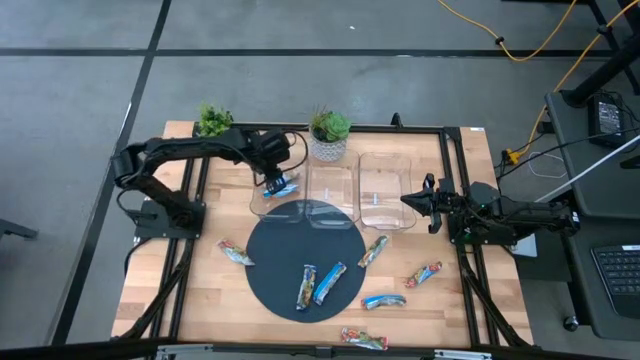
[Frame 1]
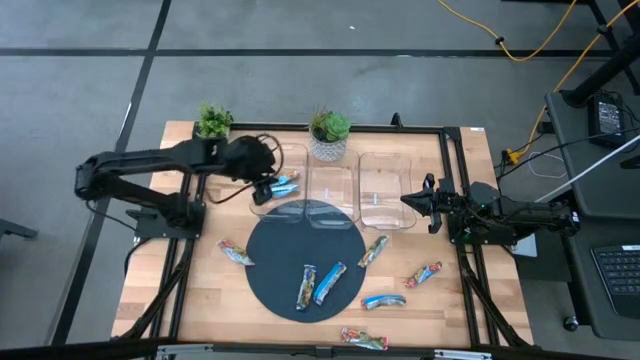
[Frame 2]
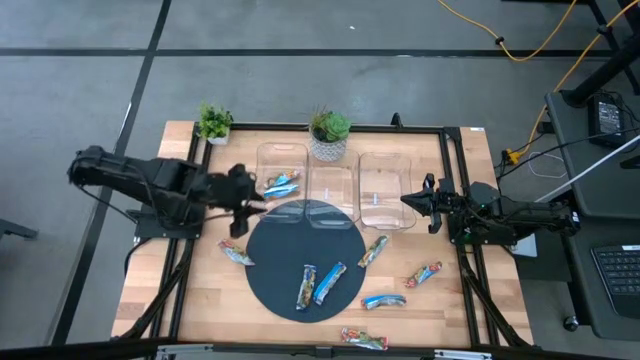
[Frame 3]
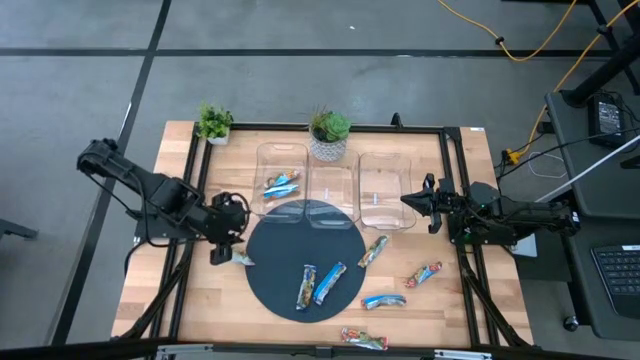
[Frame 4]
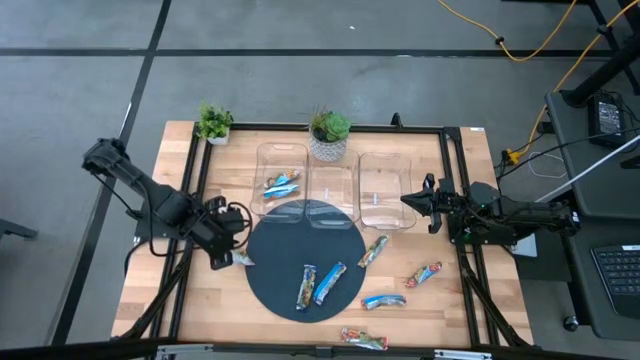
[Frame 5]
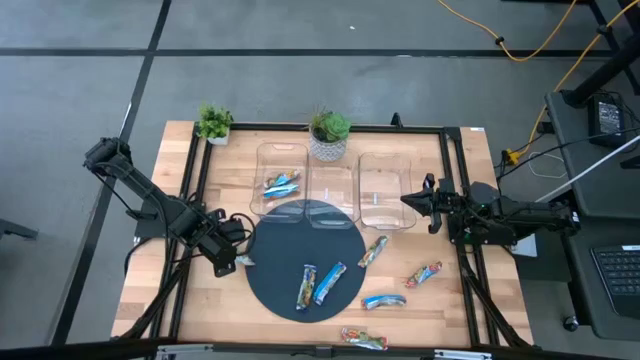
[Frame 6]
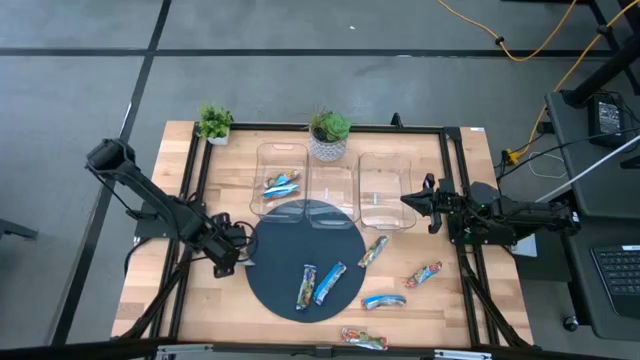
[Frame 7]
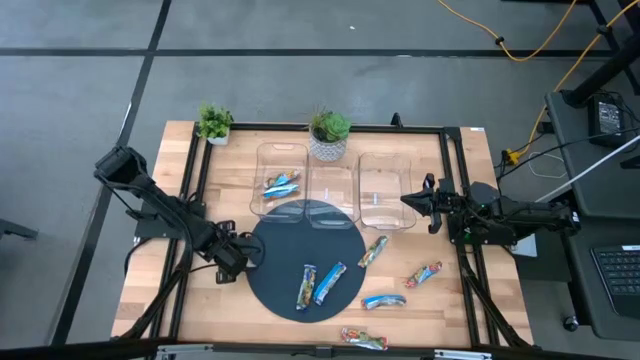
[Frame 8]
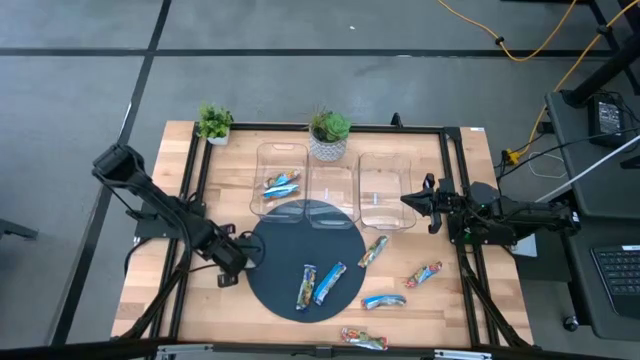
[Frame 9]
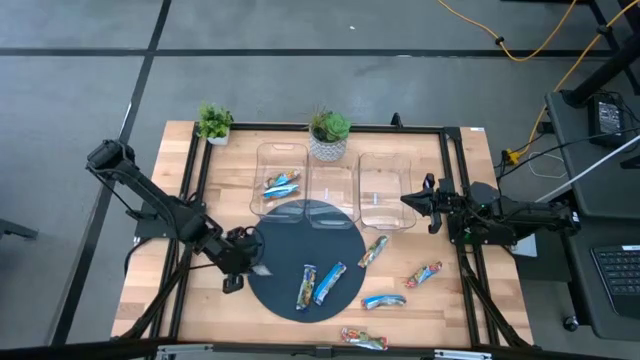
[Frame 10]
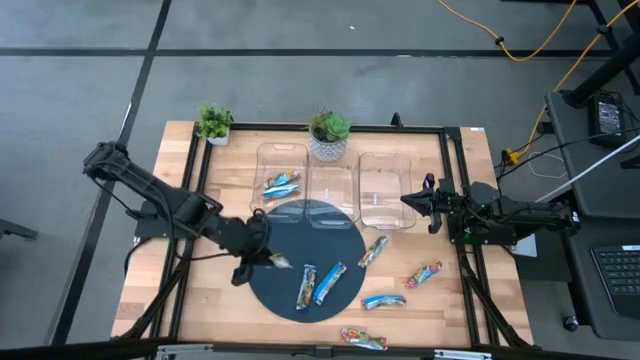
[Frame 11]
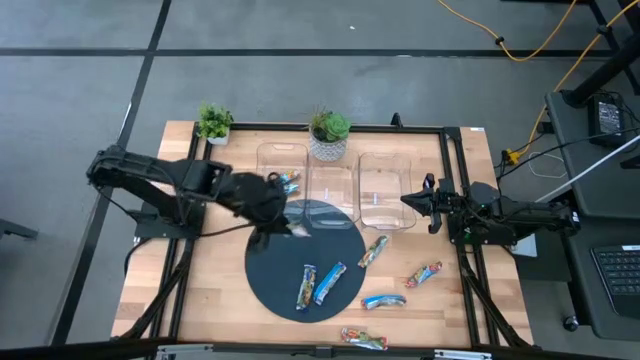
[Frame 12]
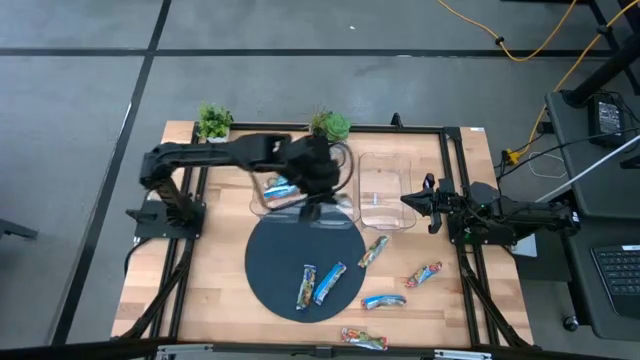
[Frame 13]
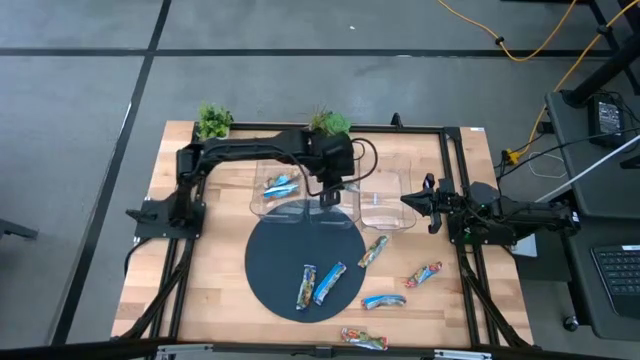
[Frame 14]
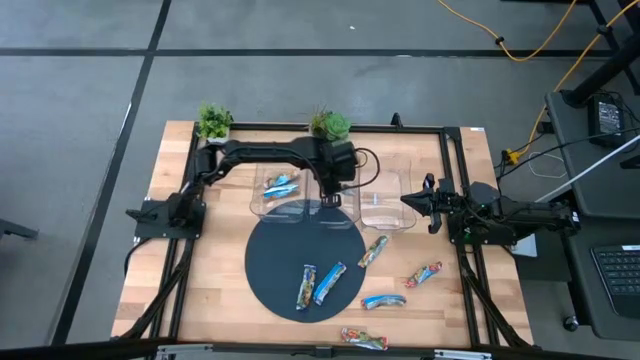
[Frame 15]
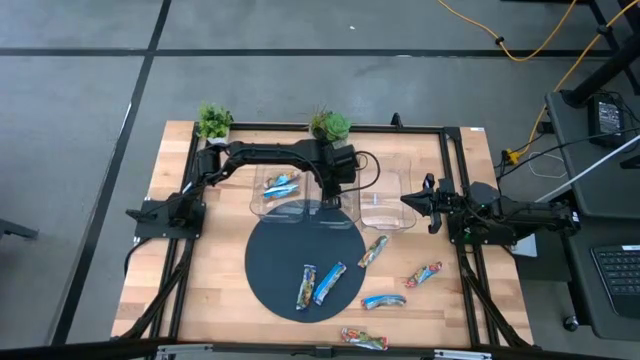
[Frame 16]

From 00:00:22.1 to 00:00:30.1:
Task: Pick and place Granola Bars by type
Put the red granola bar into the middle transparent bin

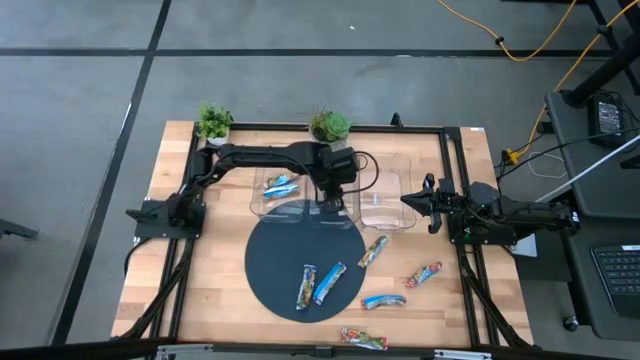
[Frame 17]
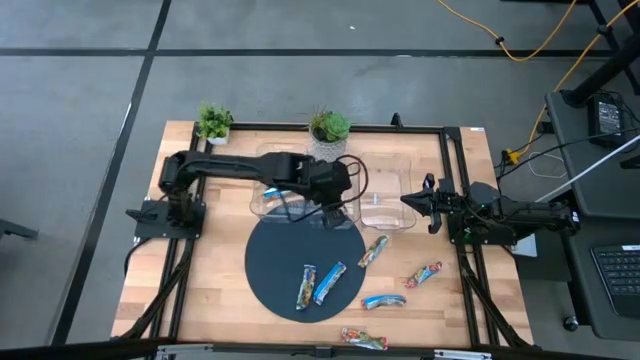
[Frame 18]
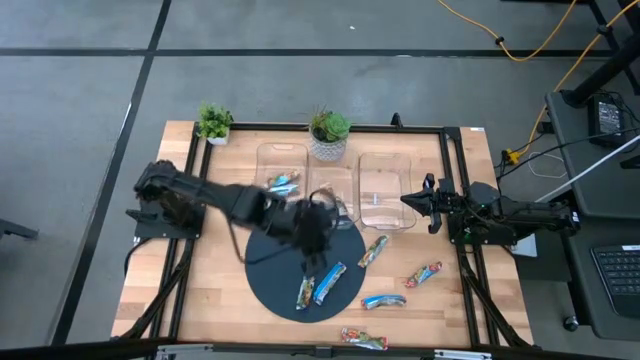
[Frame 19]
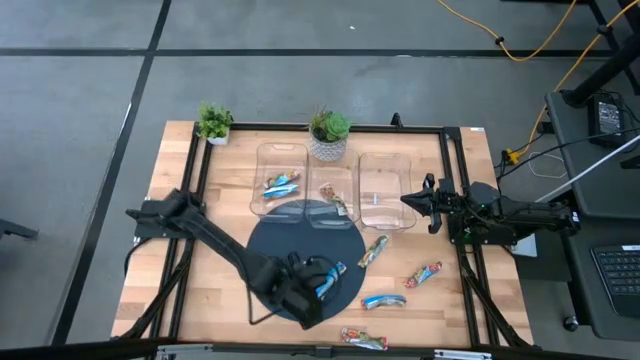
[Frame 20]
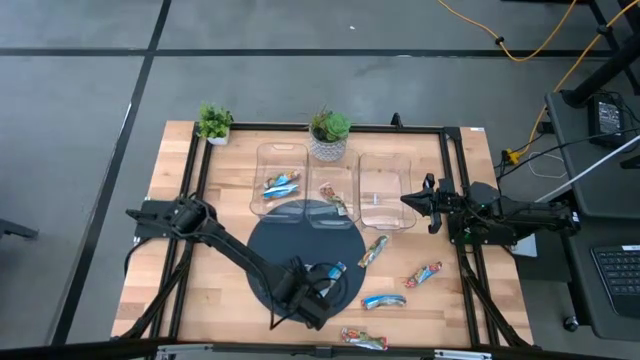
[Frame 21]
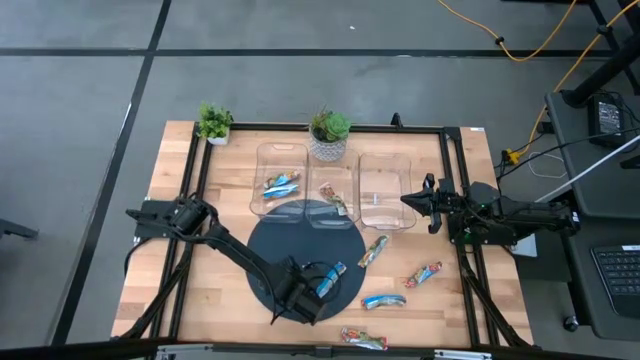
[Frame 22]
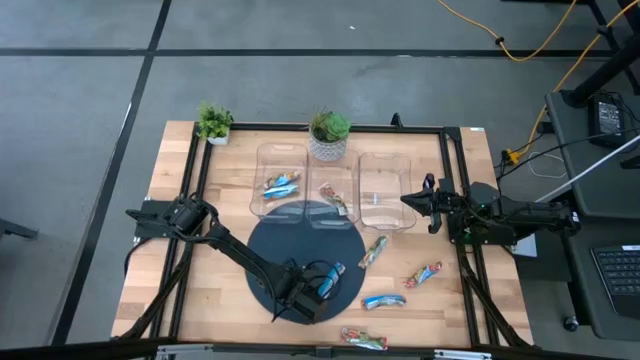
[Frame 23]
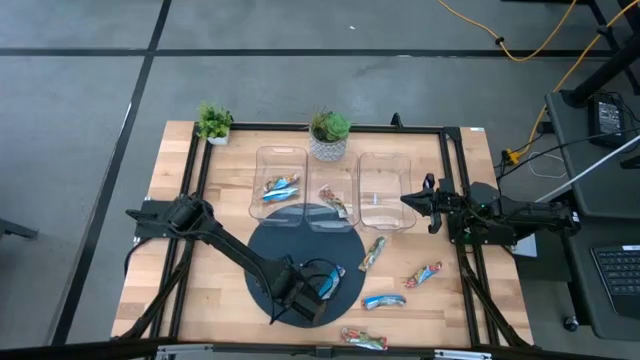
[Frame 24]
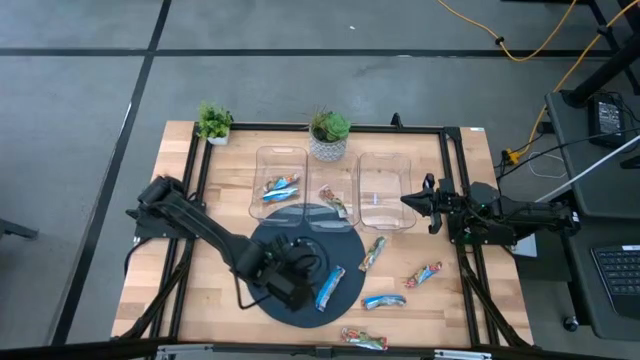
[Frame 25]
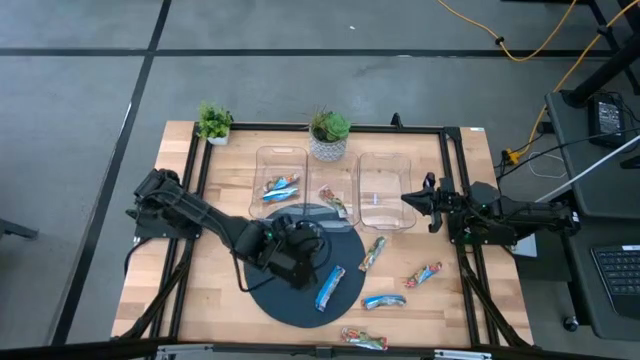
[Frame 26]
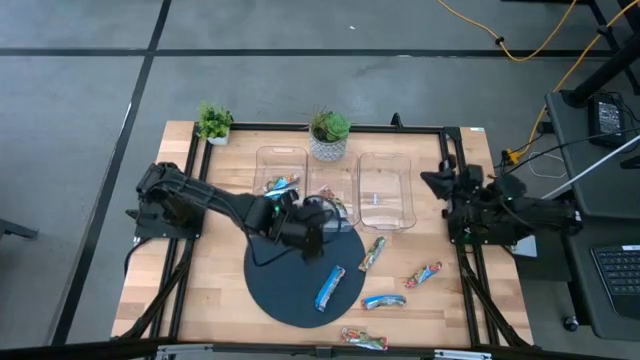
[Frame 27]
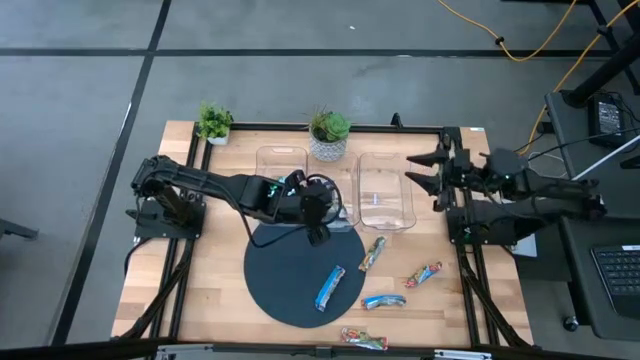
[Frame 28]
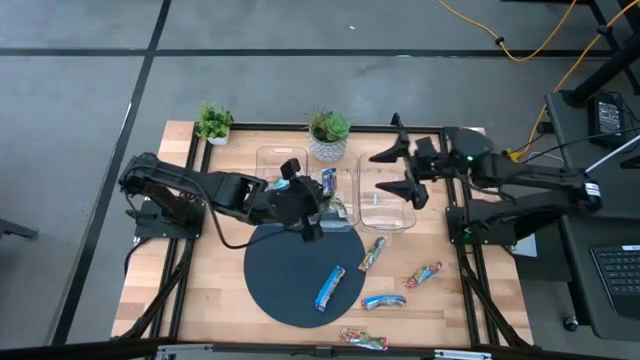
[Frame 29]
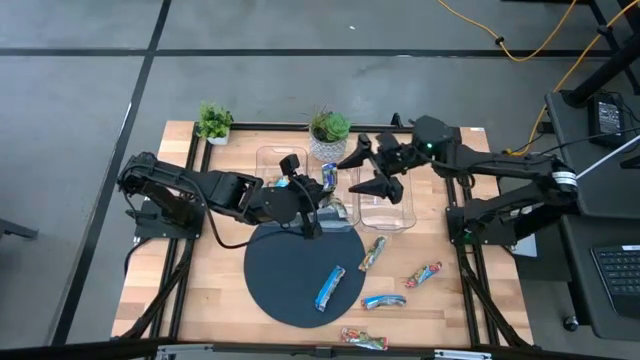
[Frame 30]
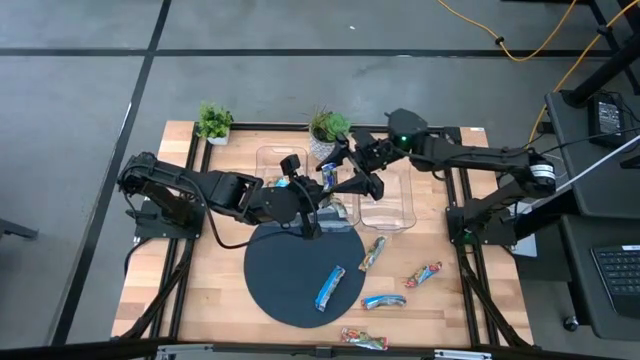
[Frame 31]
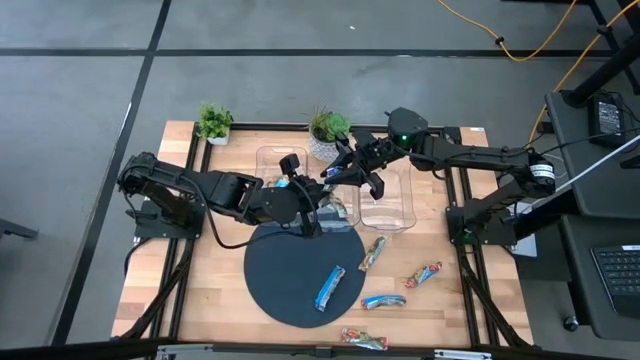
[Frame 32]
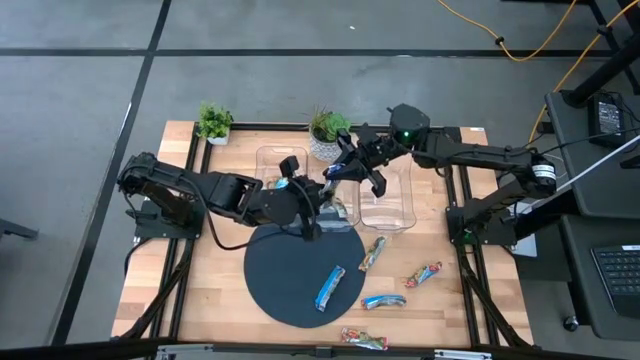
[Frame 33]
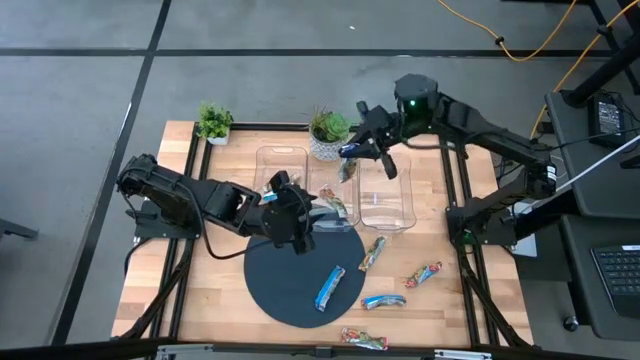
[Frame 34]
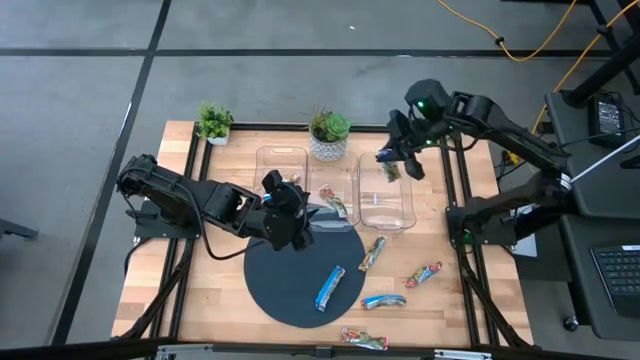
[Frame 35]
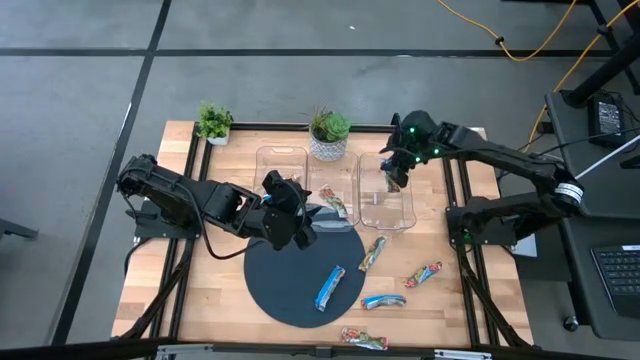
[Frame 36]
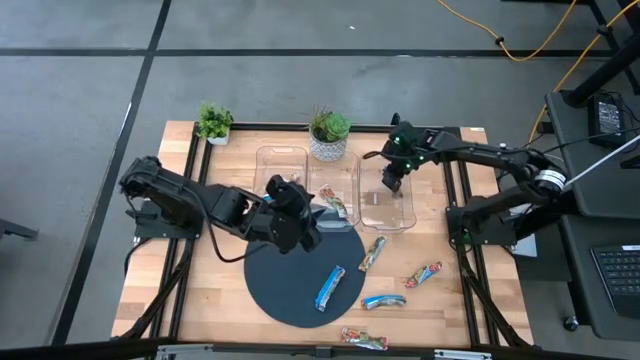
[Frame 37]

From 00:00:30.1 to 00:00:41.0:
Put the blue granola bar into the right transparent bin

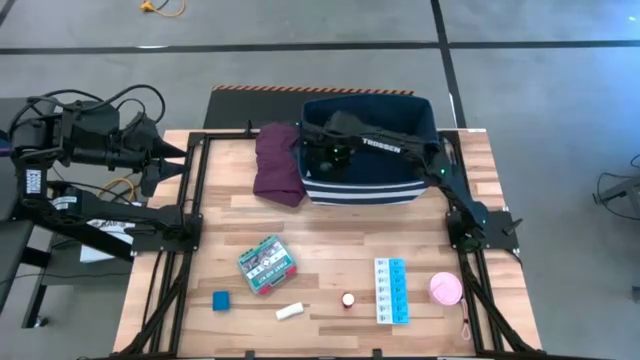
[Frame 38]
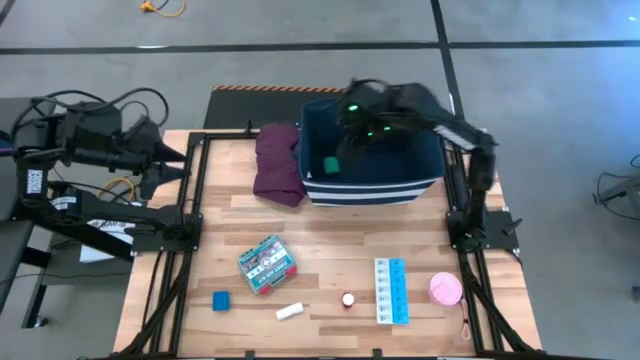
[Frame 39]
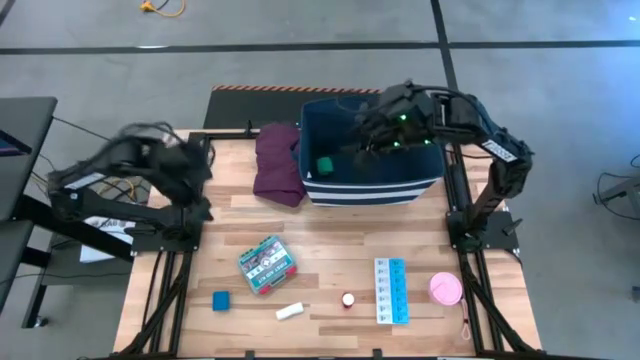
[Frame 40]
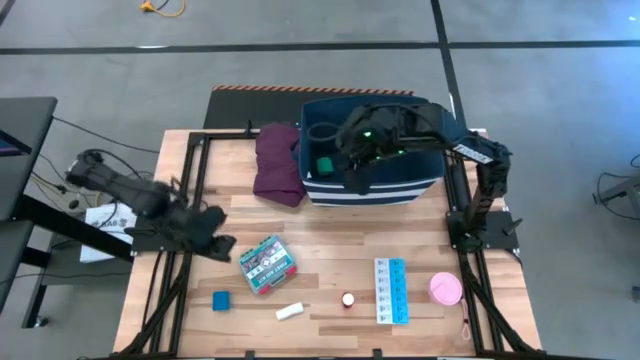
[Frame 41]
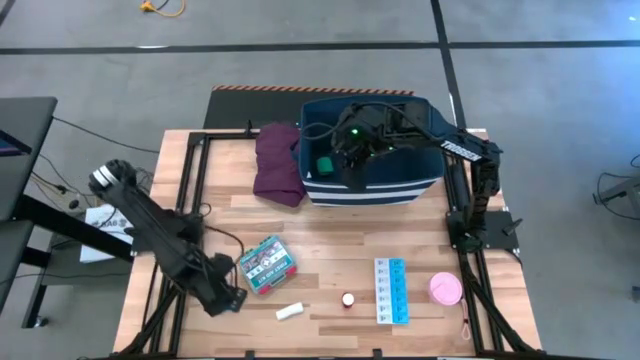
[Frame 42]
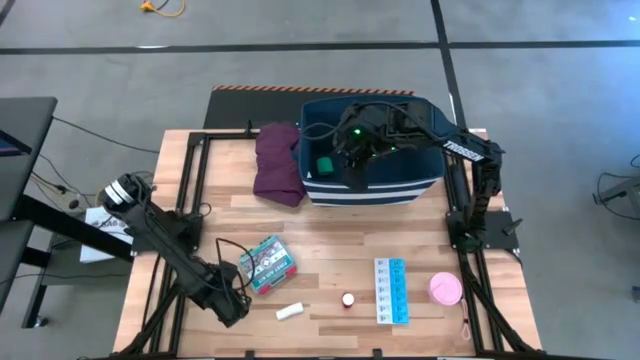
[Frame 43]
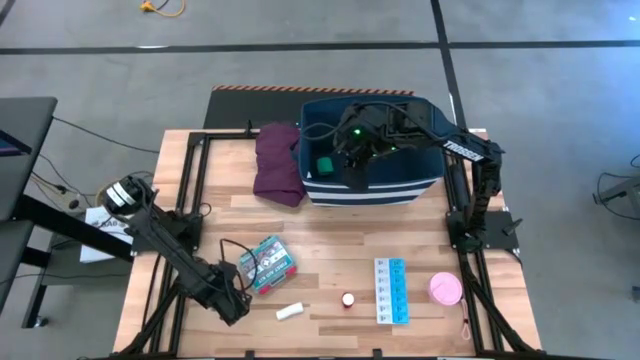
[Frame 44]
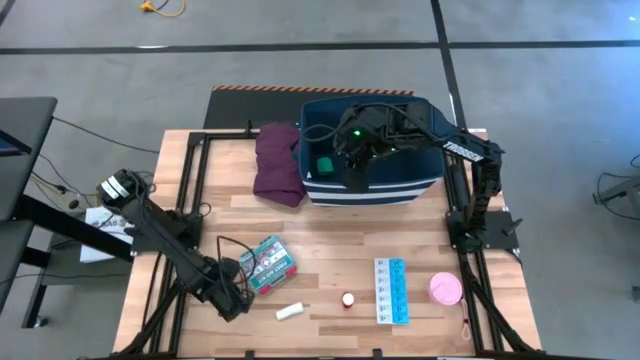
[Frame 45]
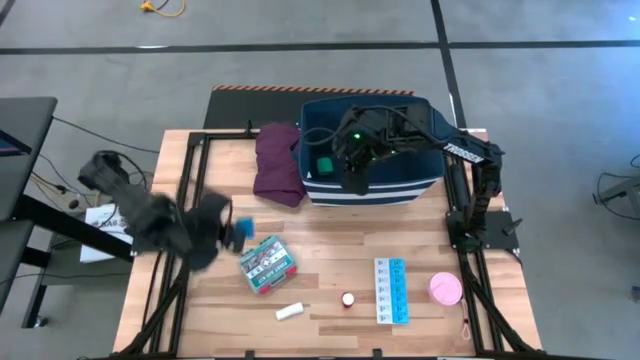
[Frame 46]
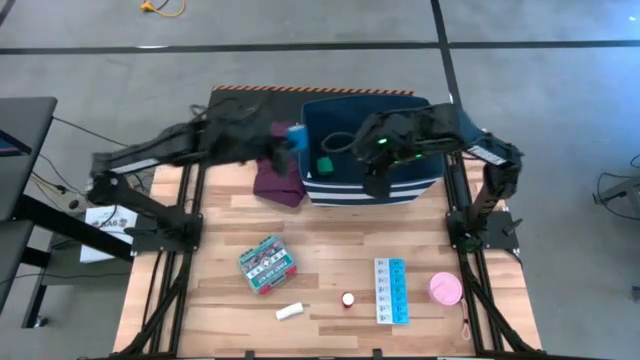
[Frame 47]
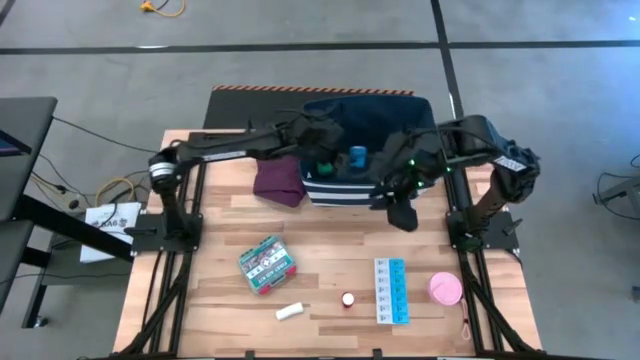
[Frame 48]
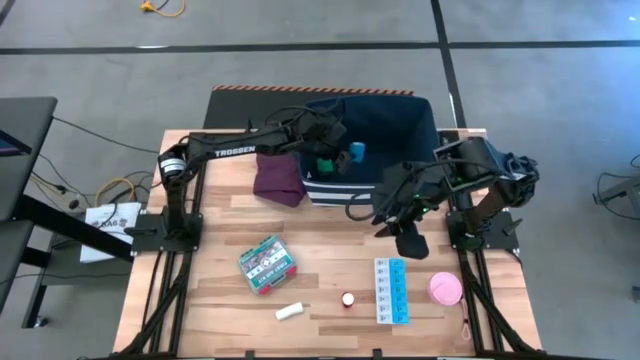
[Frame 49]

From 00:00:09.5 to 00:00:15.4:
Task: Pick & place medical supplies in basket/bin
Put the blue bandage into the blue organizer
